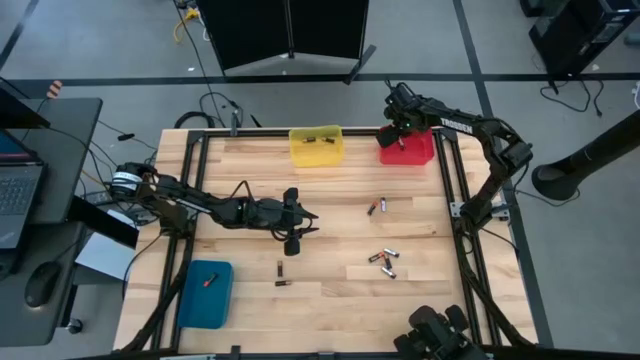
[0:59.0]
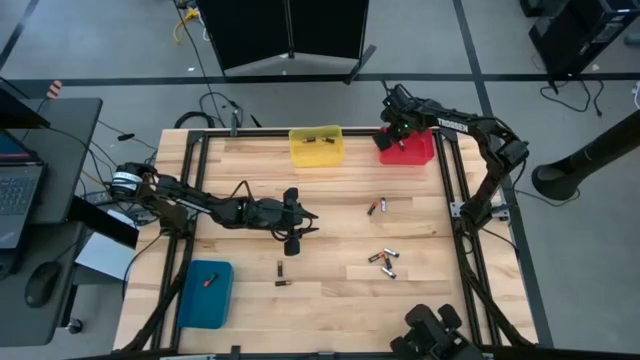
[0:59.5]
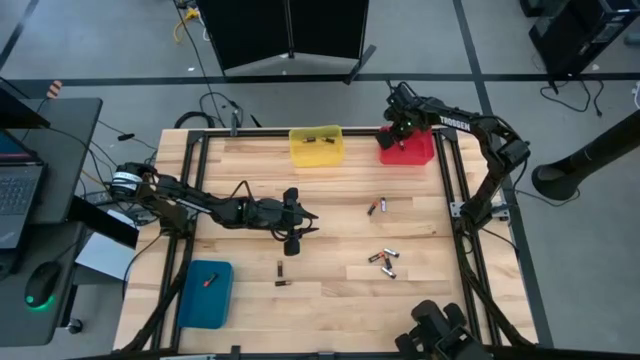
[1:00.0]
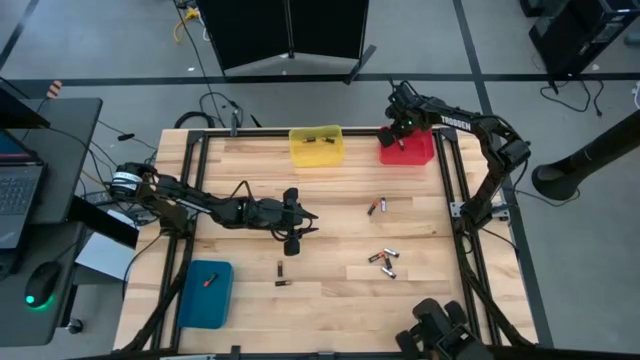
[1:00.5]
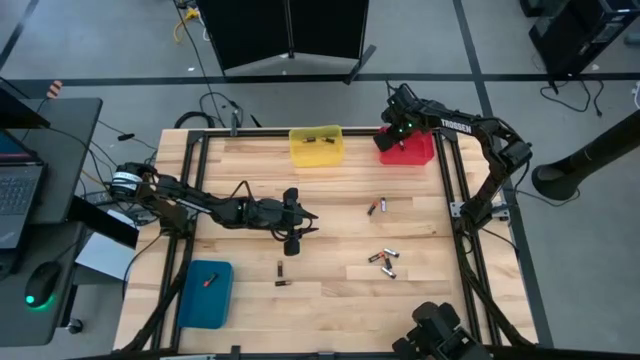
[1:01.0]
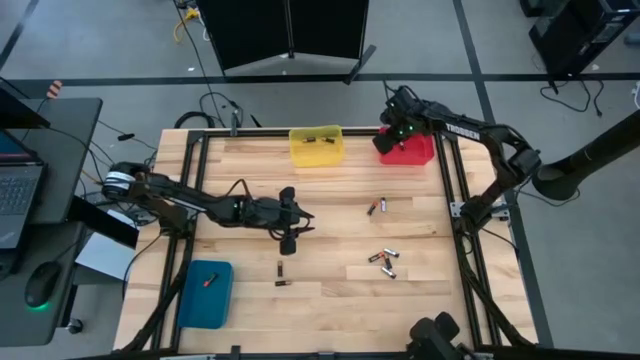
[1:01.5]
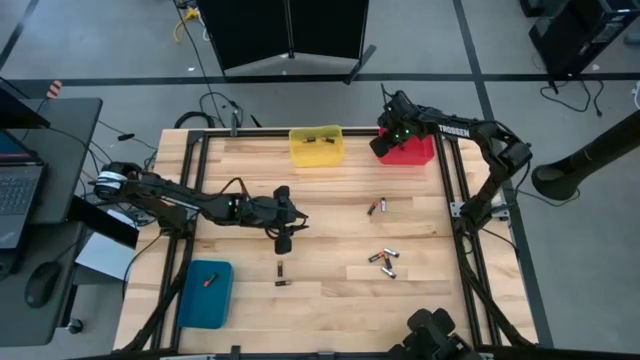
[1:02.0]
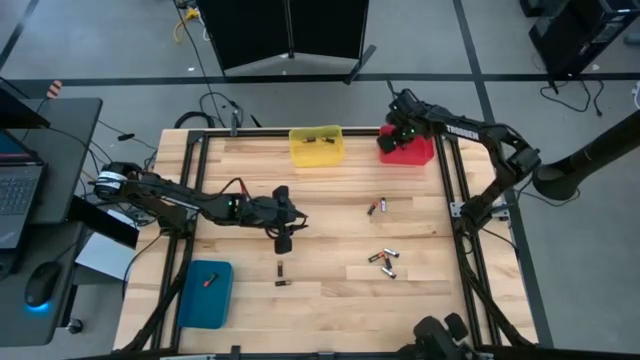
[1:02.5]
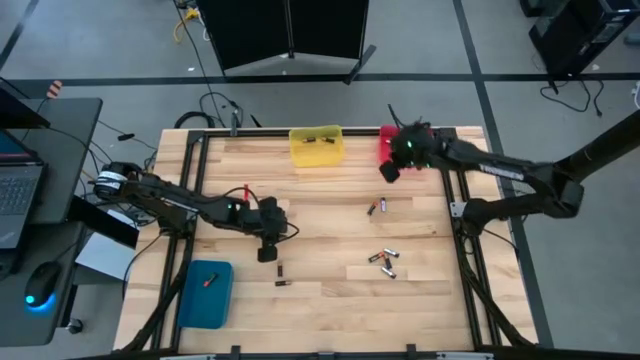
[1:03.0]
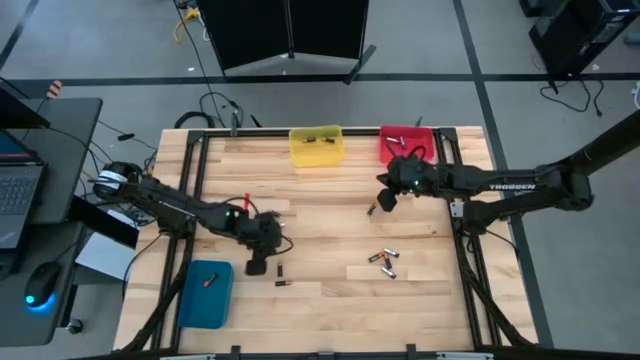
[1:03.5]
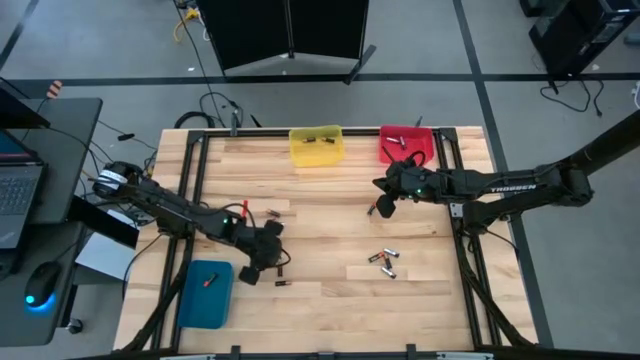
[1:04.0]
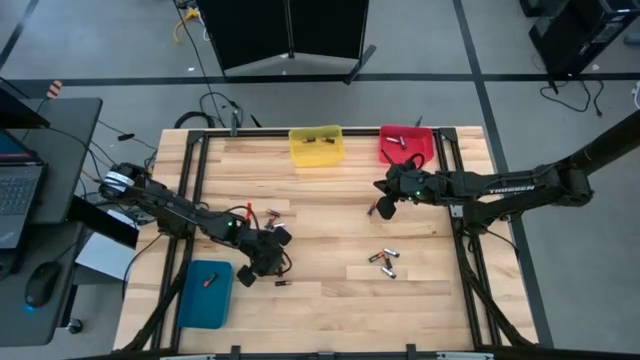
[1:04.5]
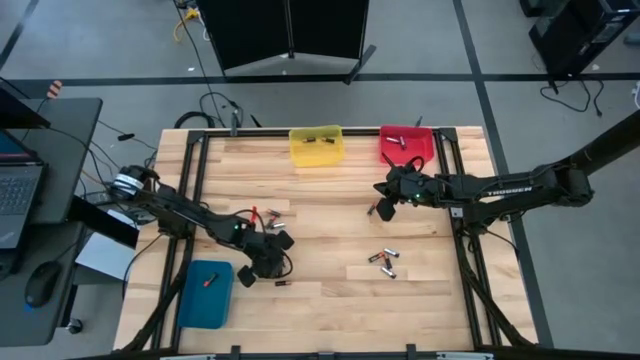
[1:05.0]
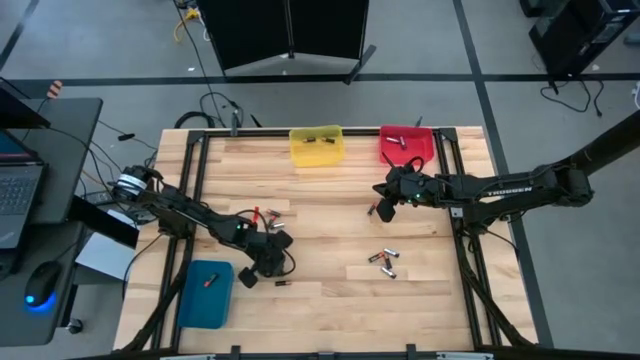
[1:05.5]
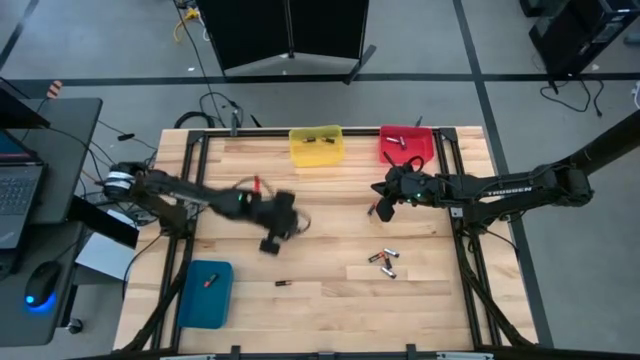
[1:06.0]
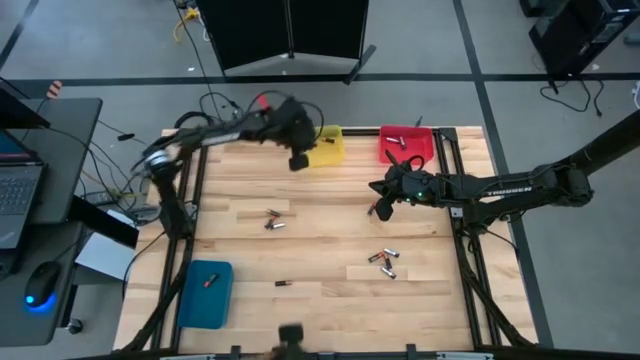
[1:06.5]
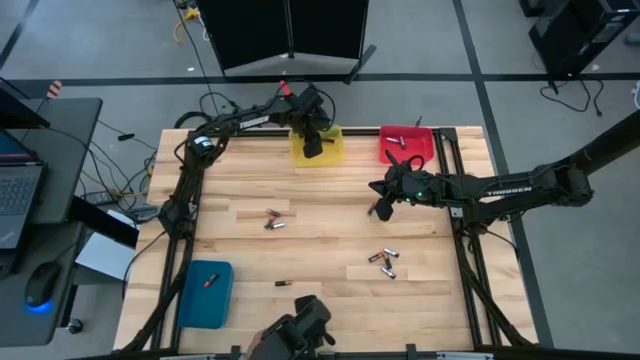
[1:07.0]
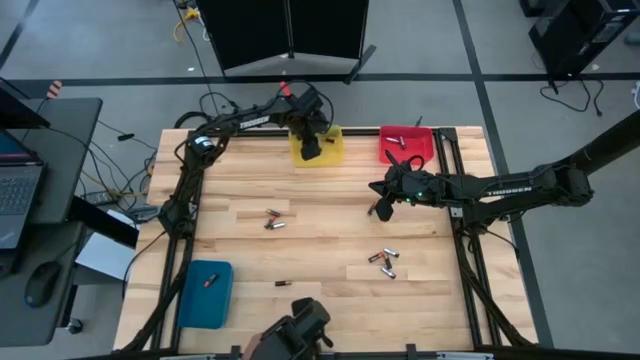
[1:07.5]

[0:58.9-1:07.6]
Task: Sort batteries
Put the black-brown battery into the yellow bin

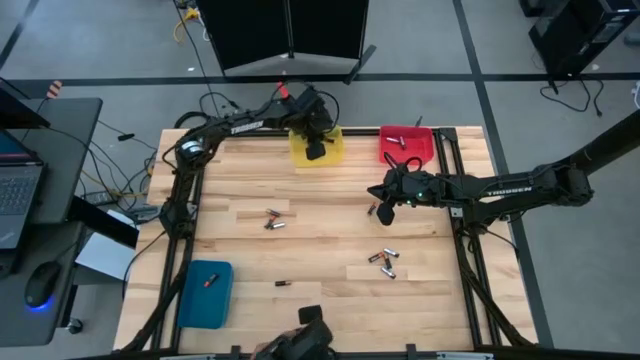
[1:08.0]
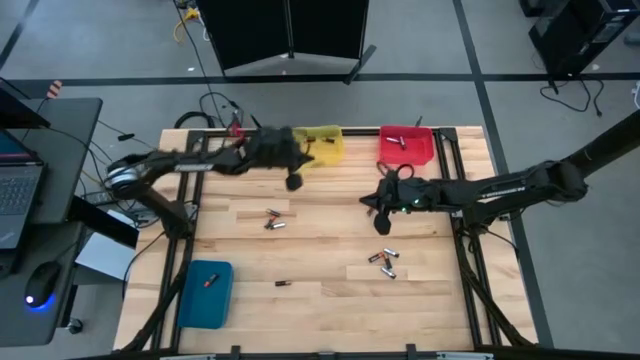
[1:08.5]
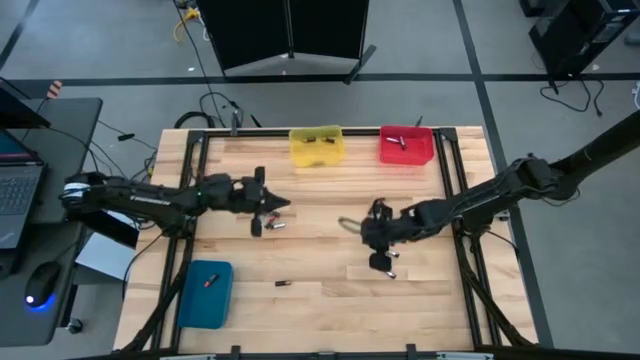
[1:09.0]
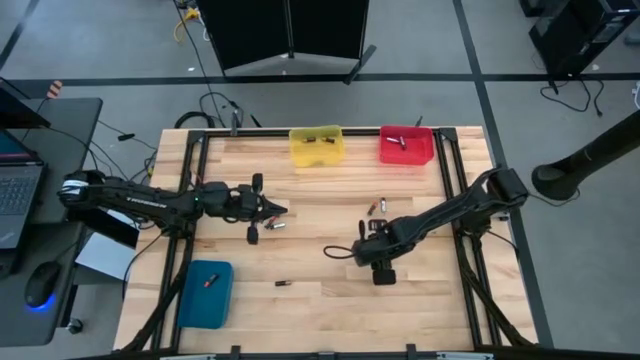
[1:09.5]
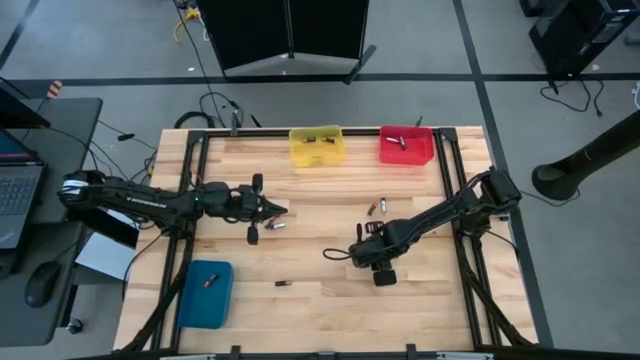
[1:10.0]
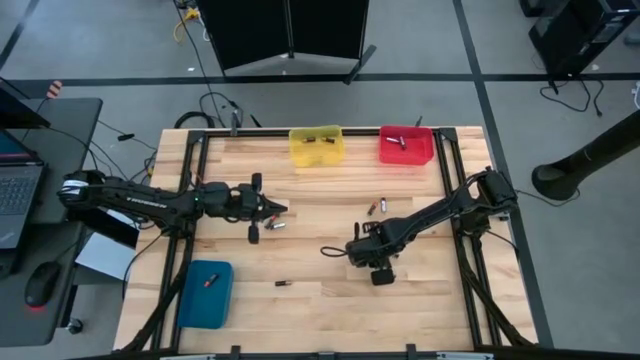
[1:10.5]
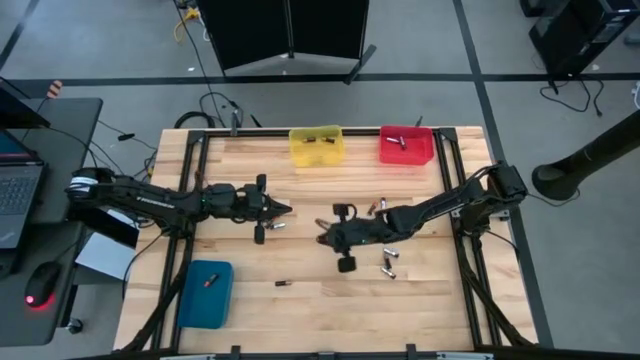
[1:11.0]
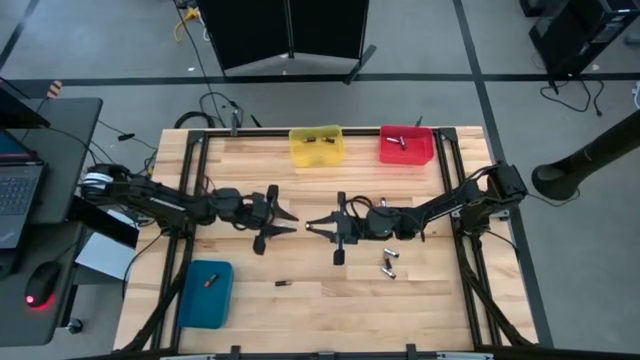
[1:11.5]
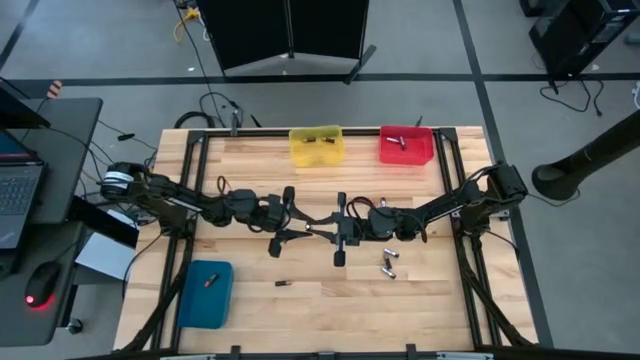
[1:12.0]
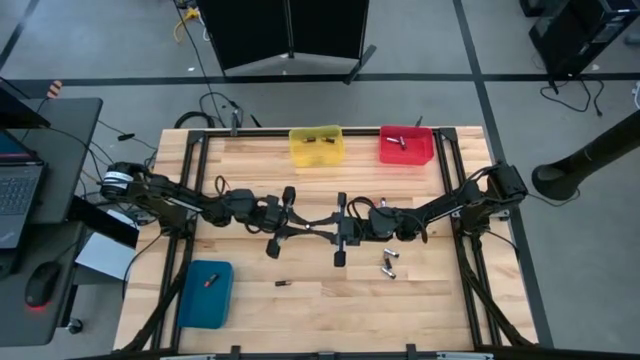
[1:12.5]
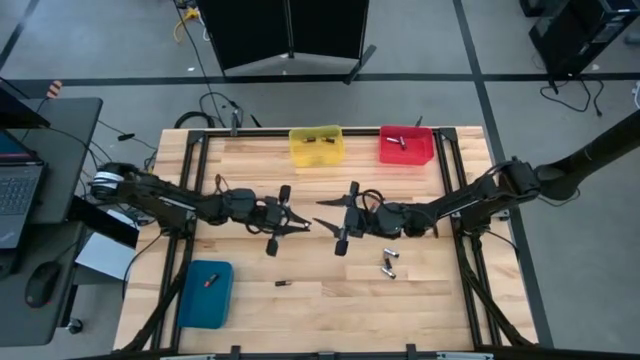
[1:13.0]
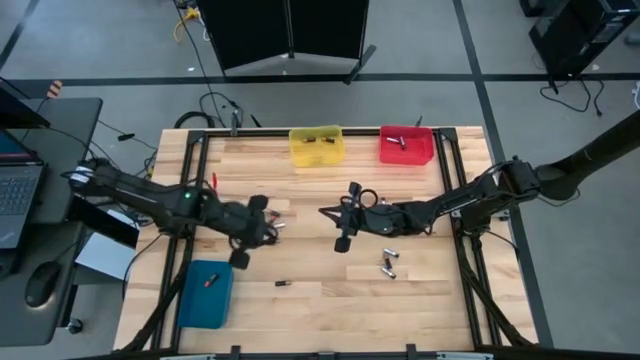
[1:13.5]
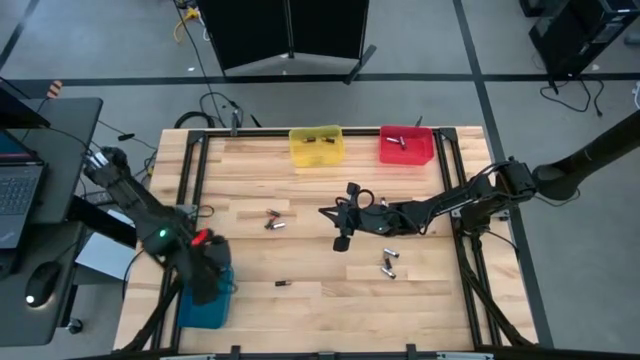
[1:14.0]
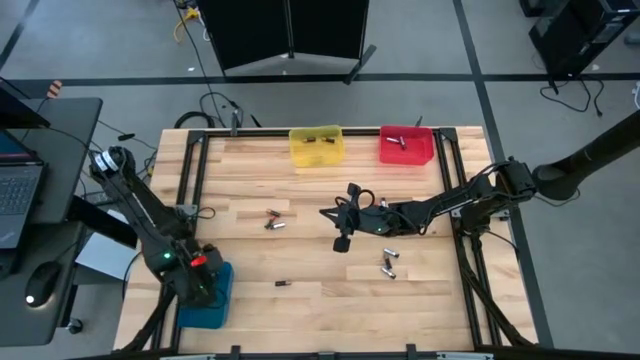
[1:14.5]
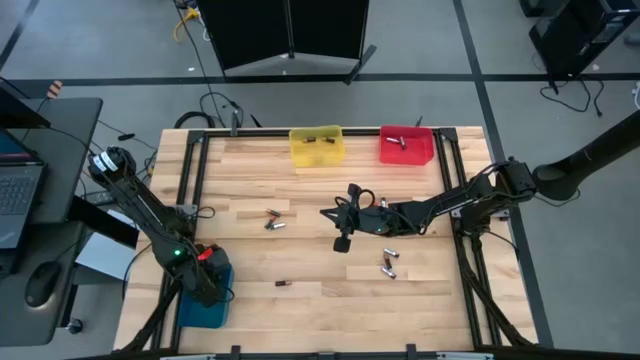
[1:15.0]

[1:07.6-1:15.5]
Put the black-red battery into the blue bin

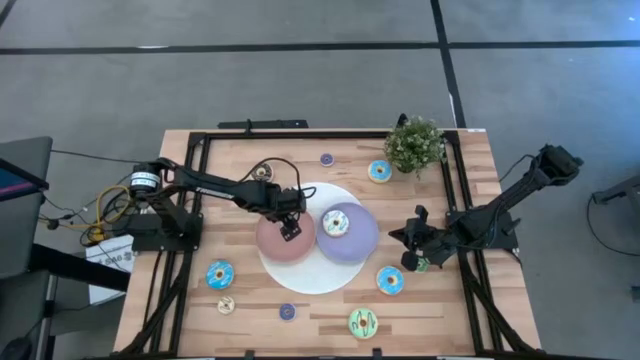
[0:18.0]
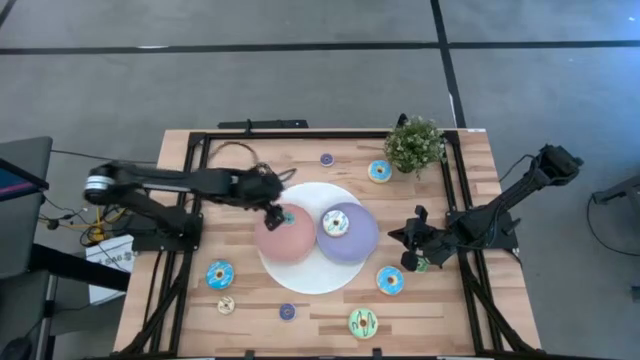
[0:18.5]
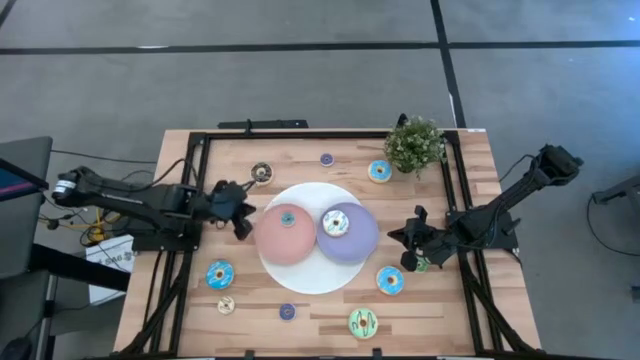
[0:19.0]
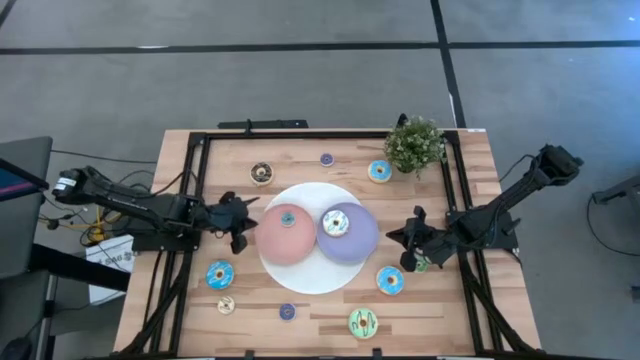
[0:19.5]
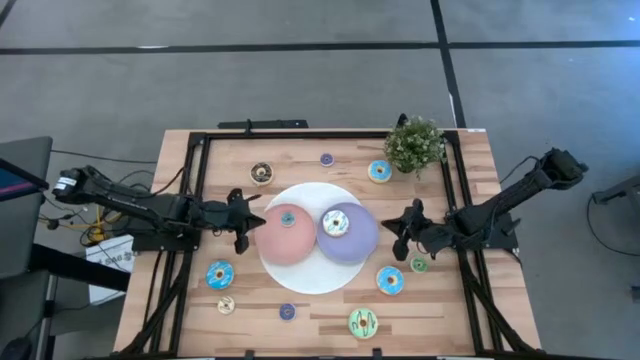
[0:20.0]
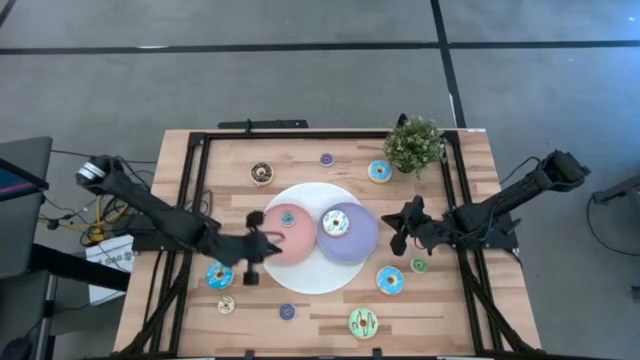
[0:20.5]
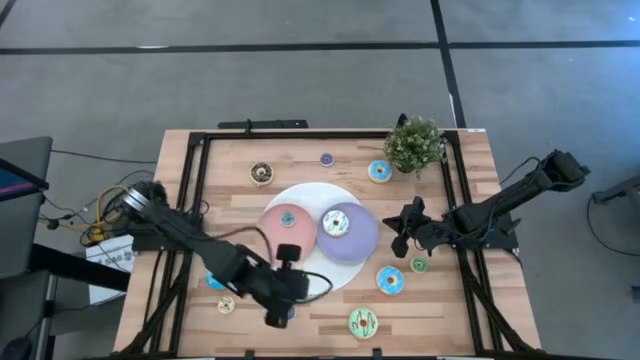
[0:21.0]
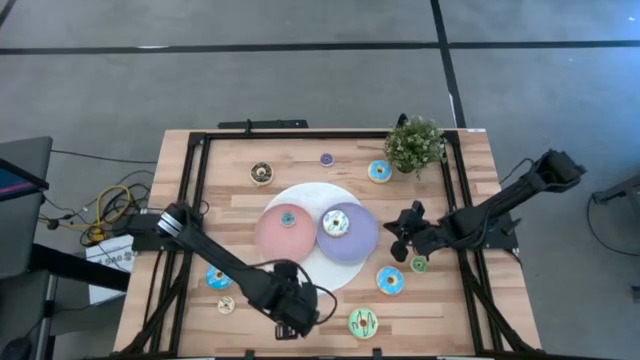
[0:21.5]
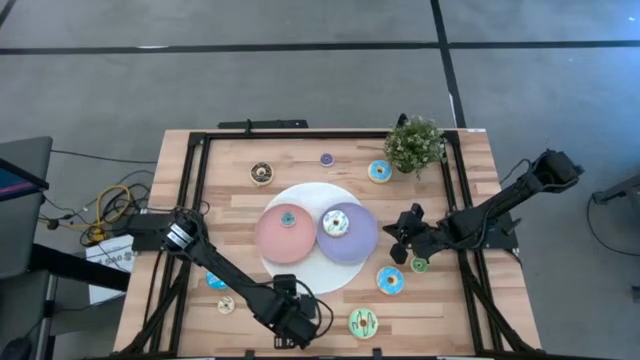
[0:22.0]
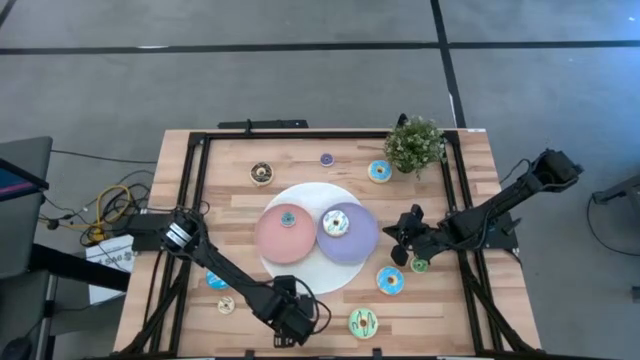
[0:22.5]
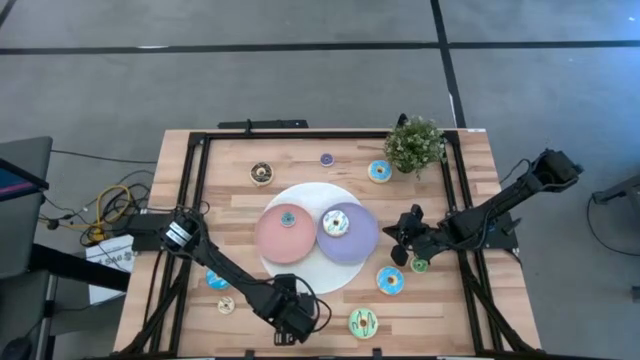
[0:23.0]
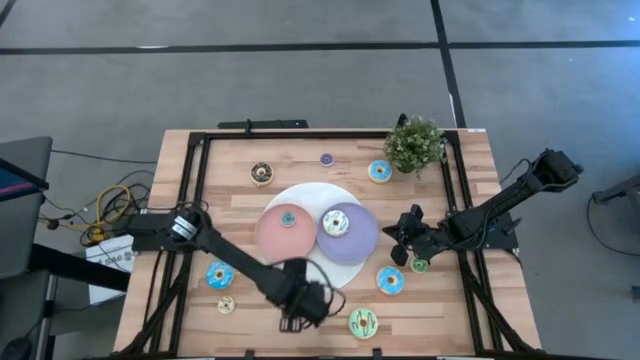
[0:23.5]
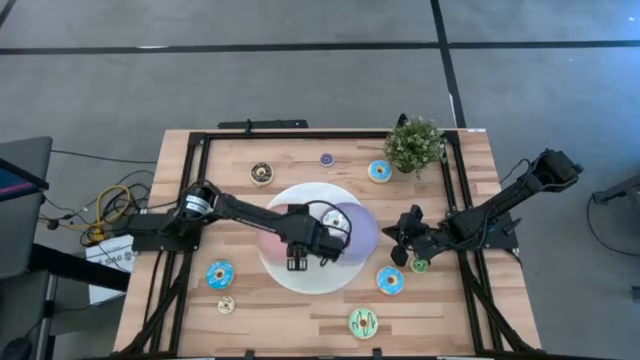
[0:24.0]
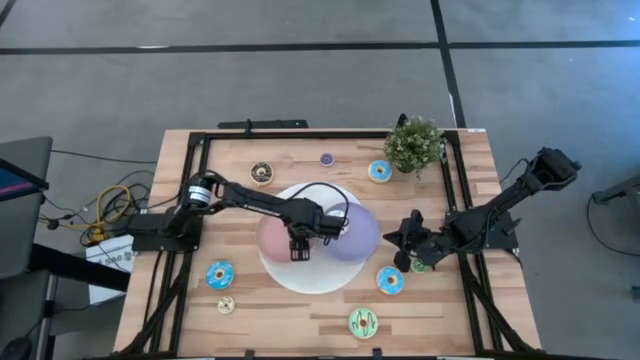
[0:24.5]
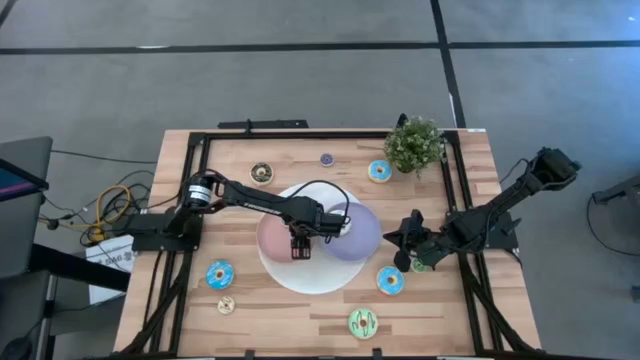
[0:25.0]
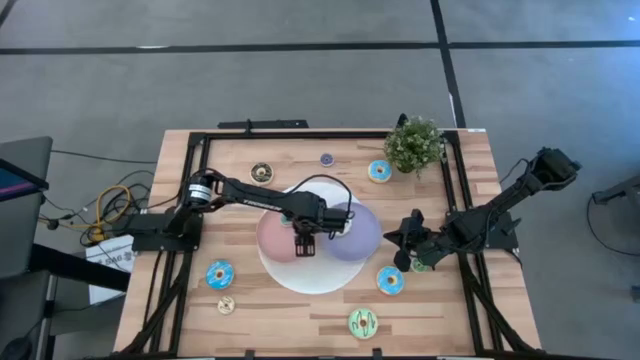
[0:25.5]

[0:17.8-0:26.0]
Task: Pick & Place donuts
Put the bottom small violet donut on the pink plate
